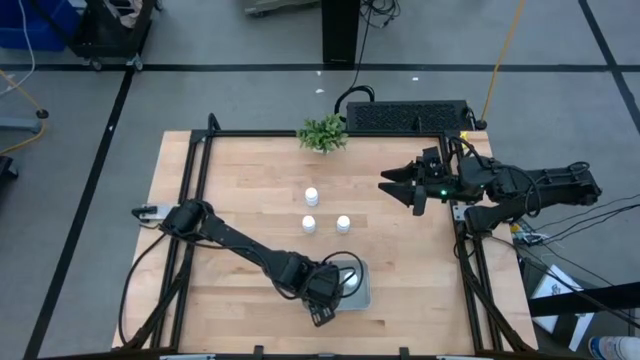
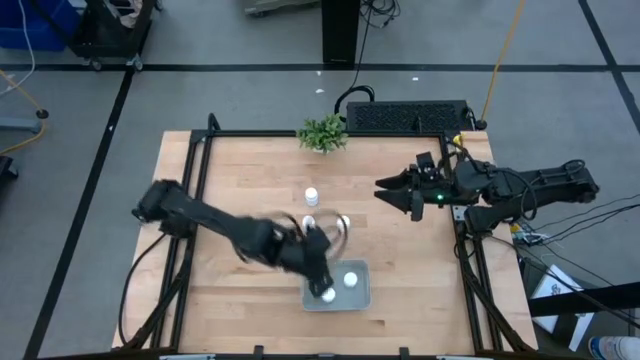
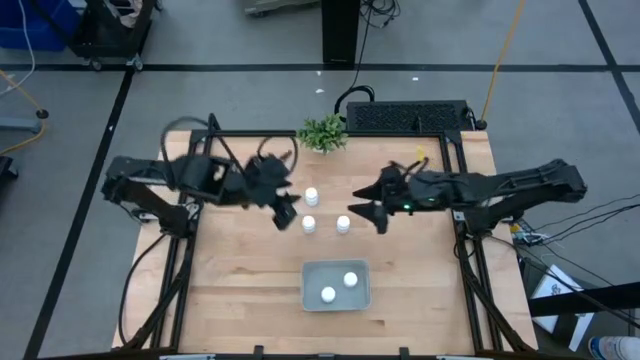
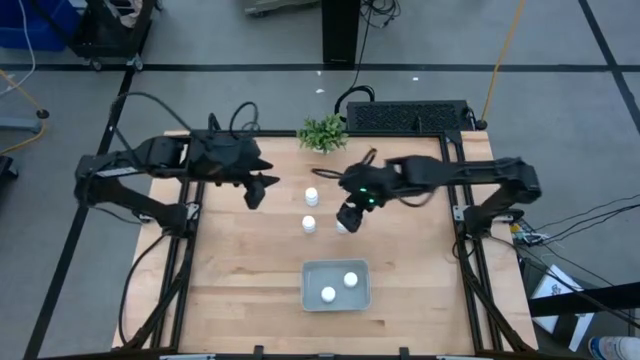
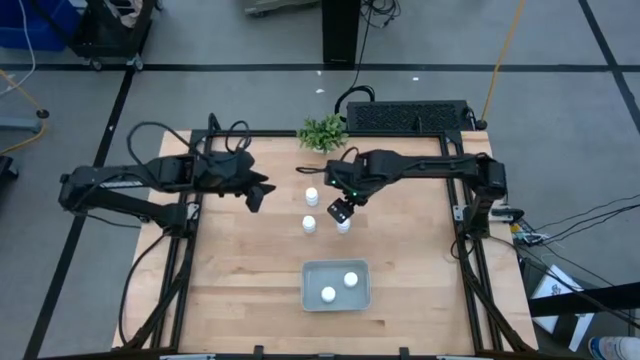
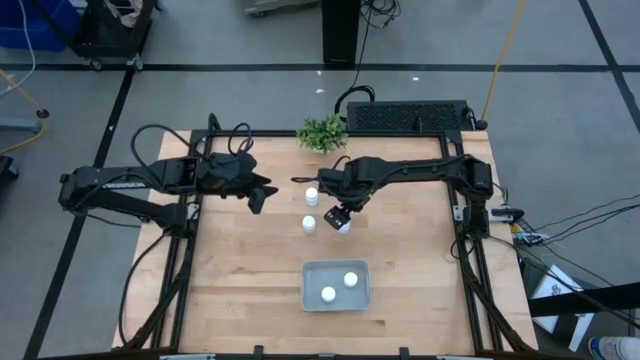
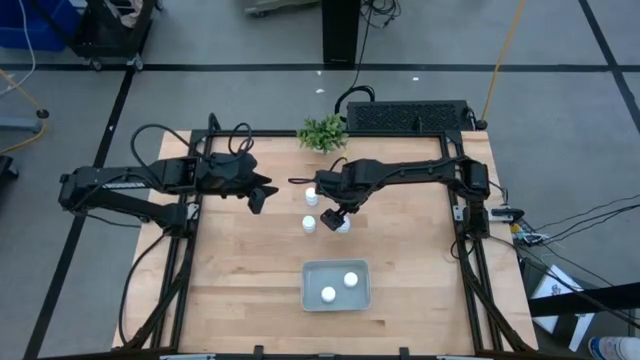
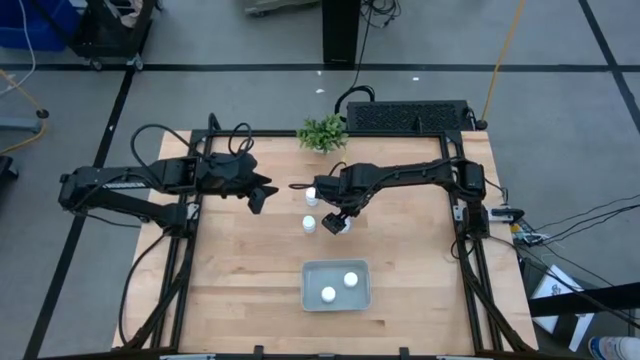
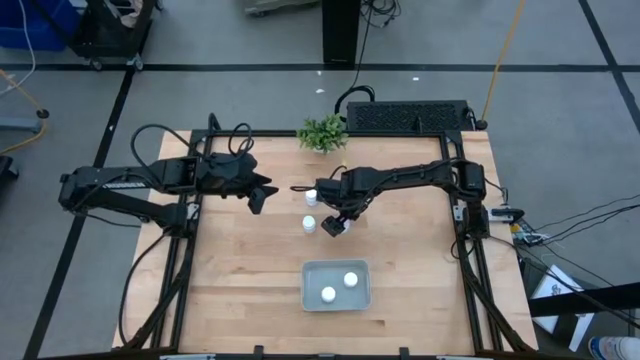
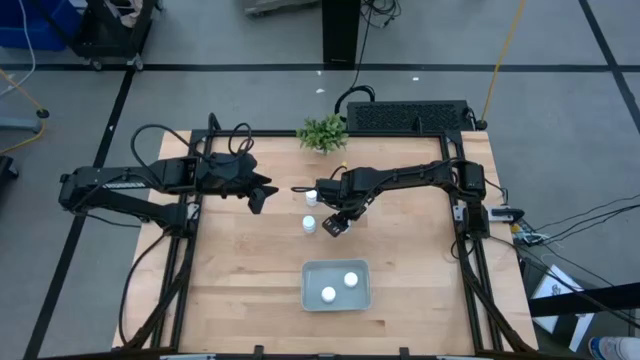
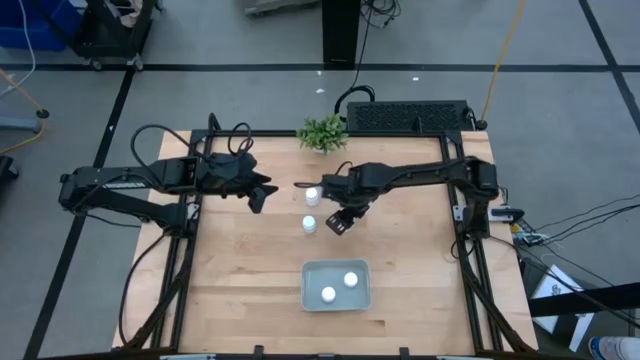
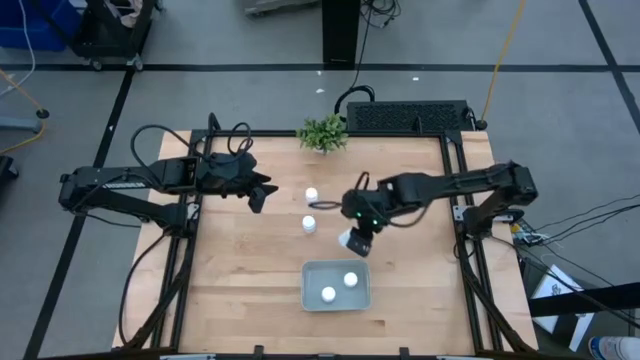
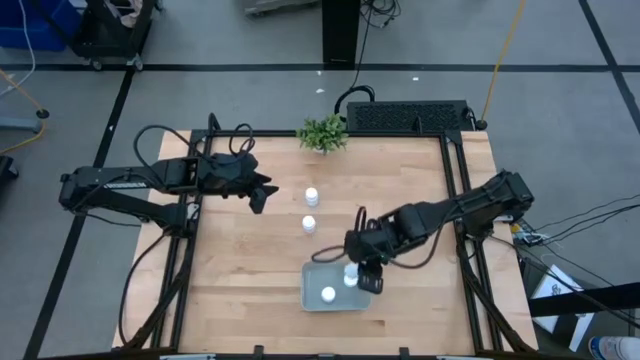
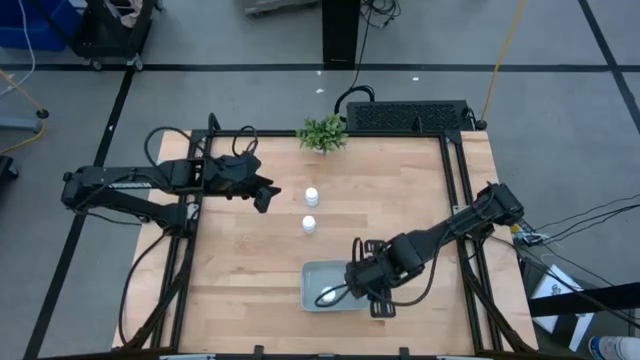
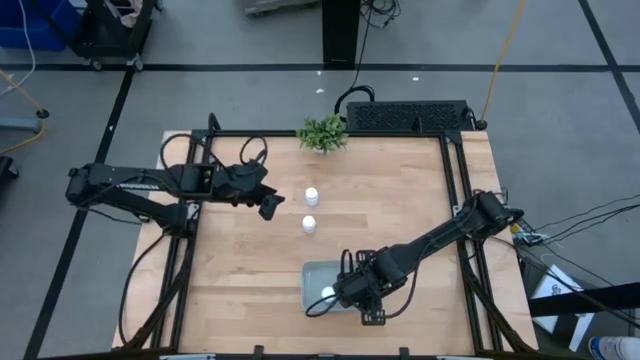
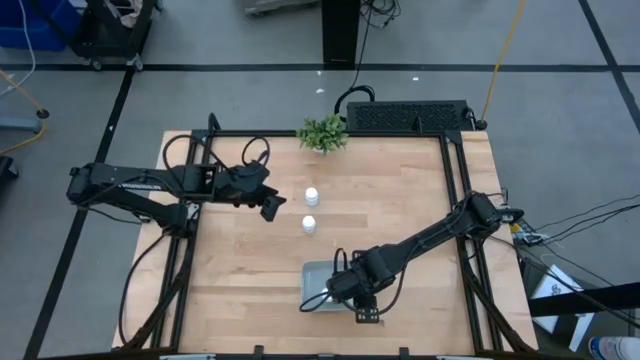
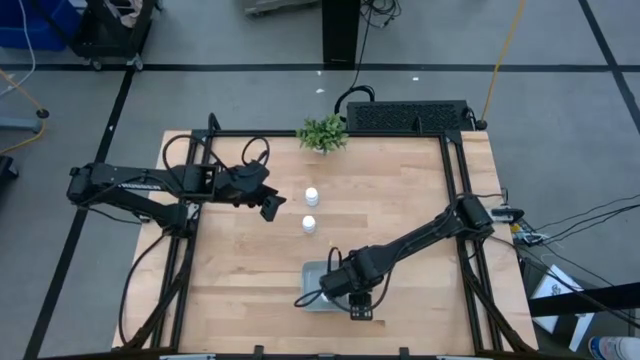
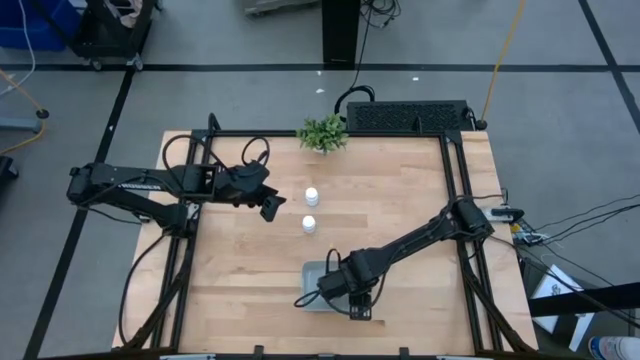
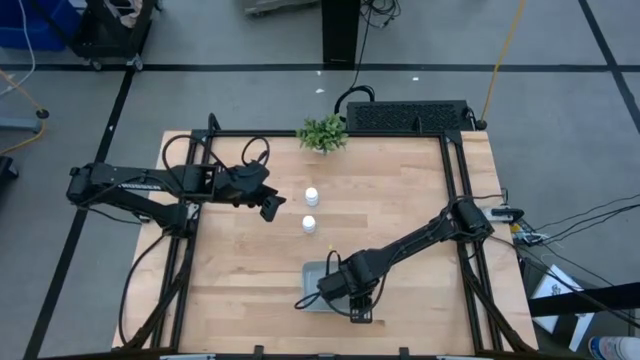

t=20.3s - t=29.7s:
Task: Pick and place pill bottles into a basket
Put the white medicine bottle into the gray bin

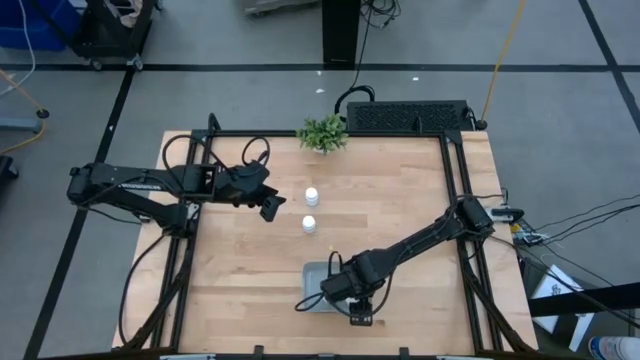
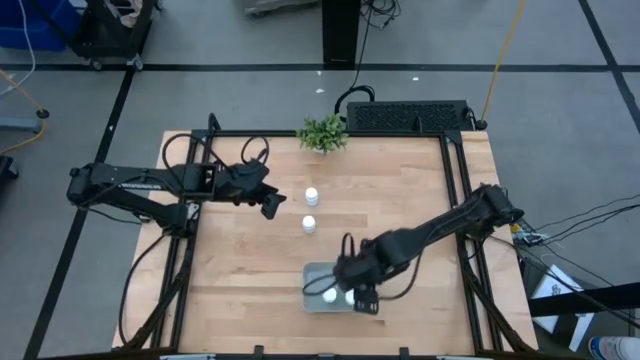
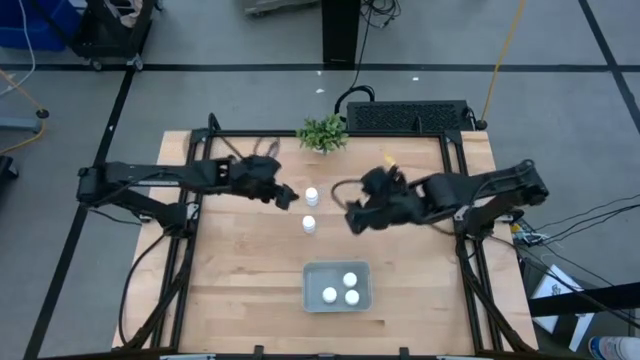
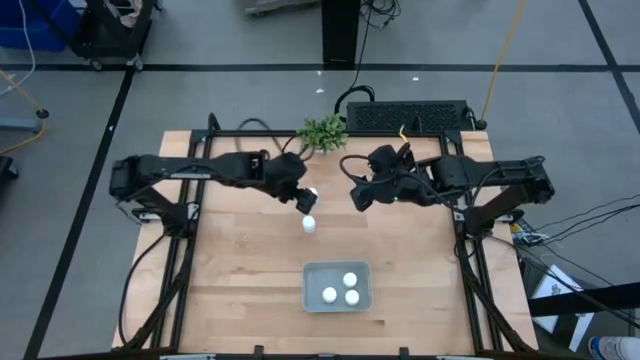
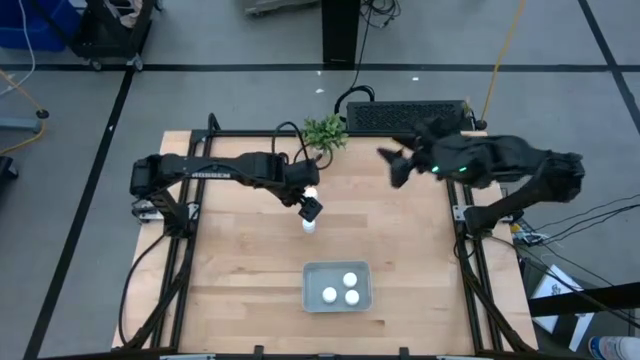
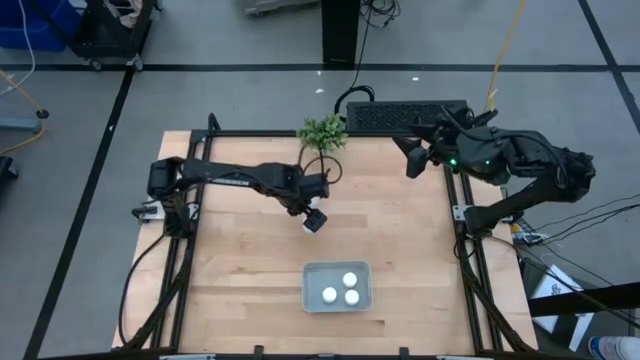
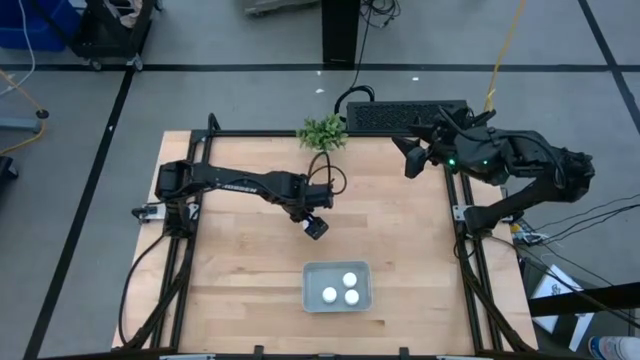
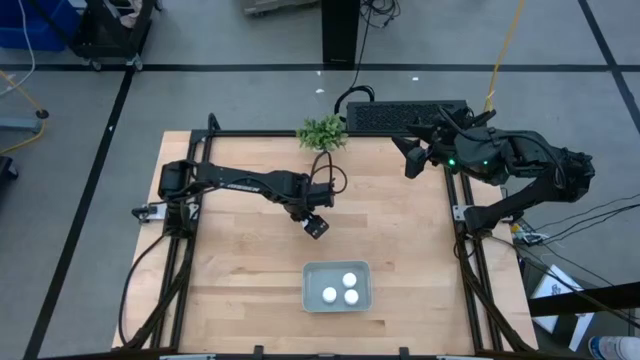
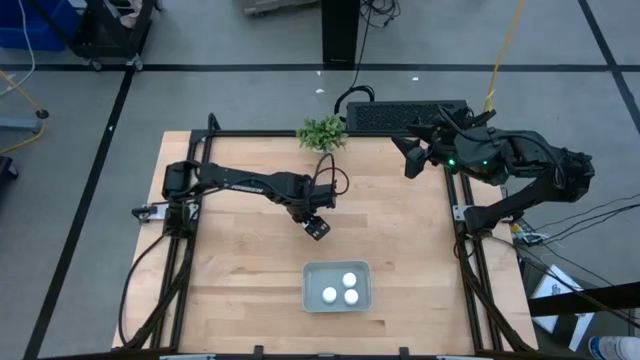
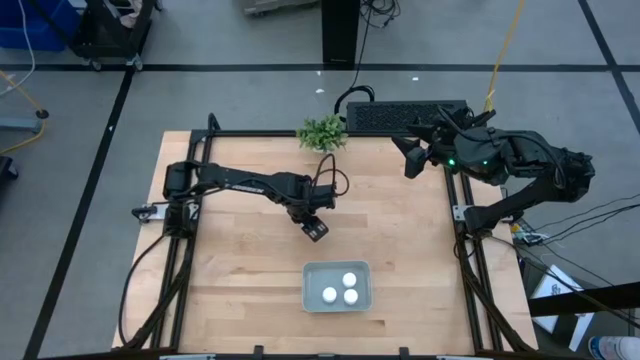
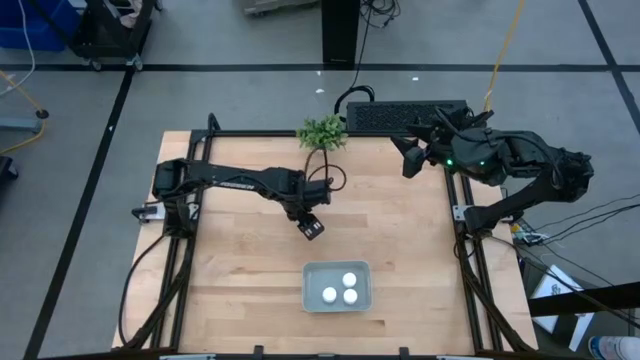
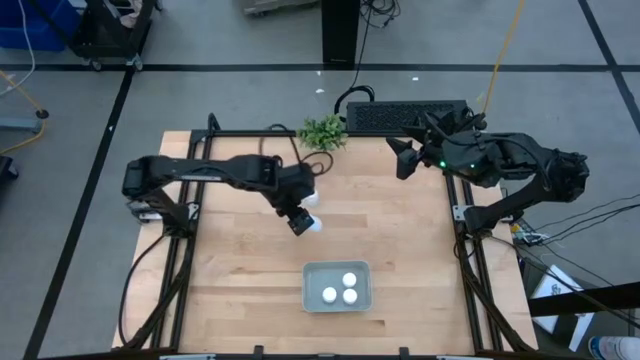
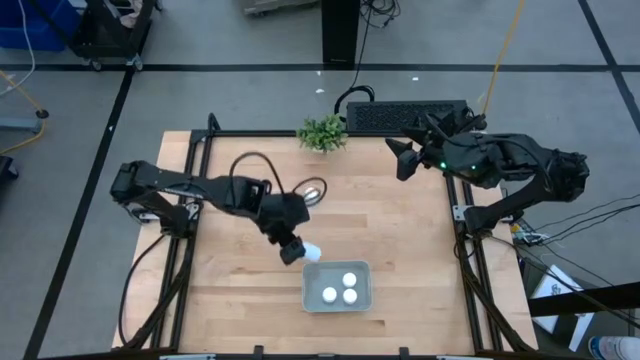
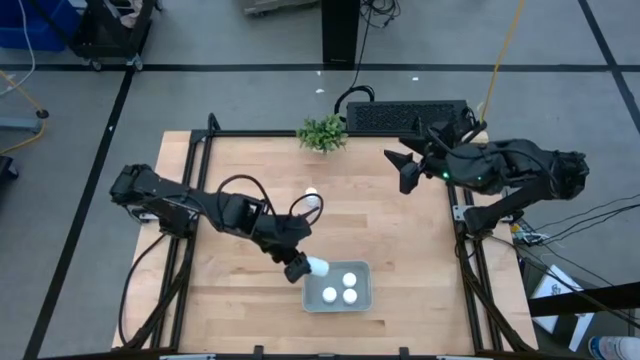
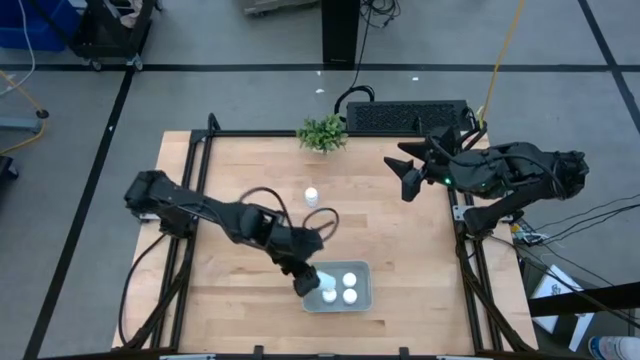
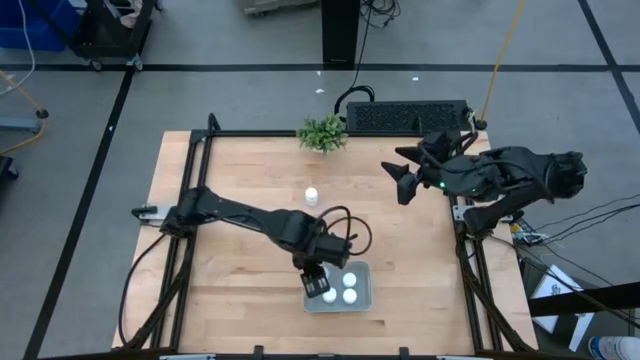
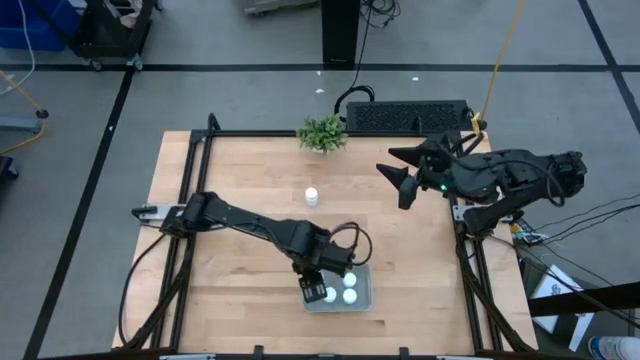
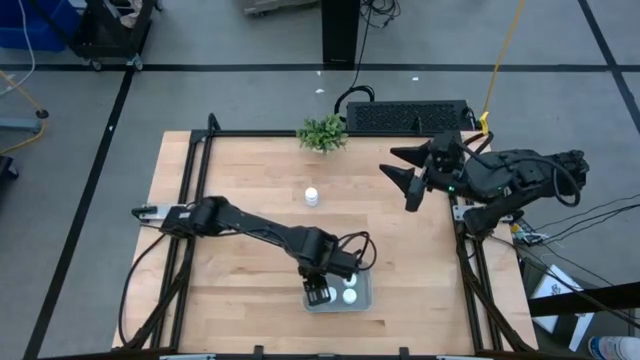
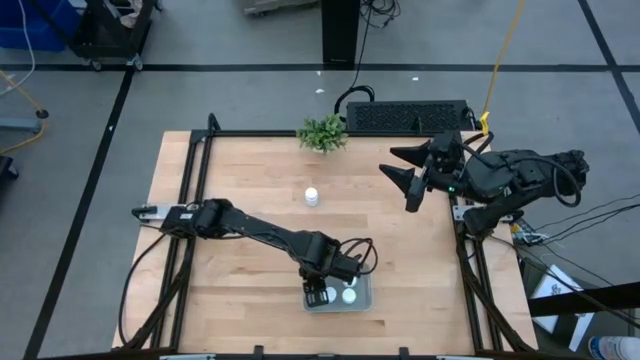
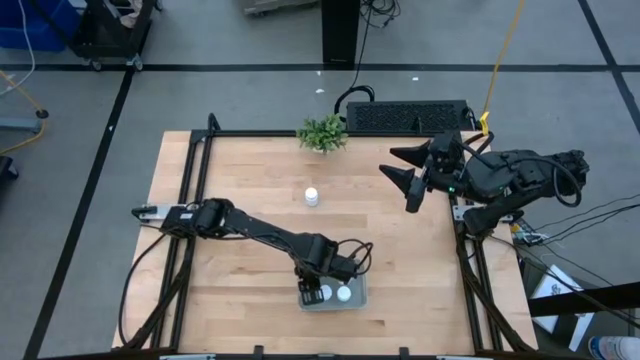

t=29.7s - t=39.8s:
Put the white medicine bottle into the gray bin

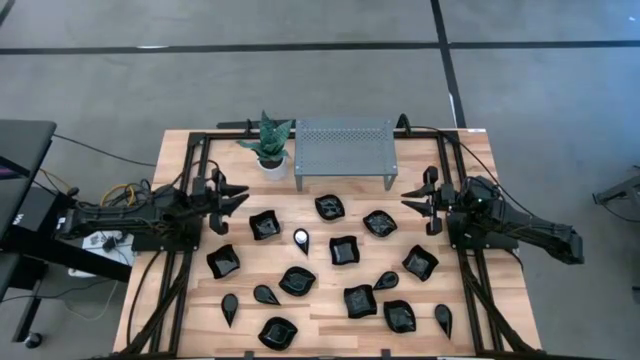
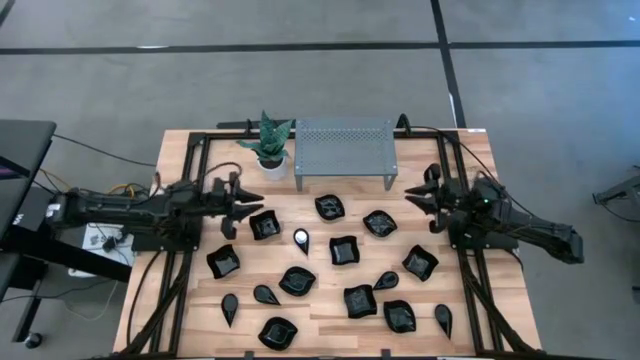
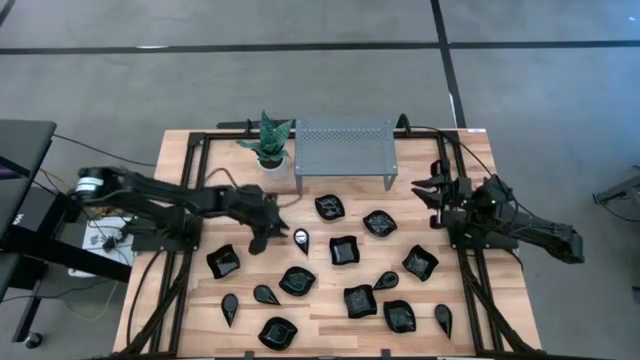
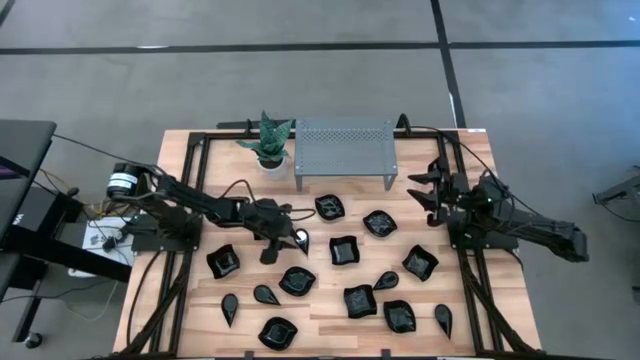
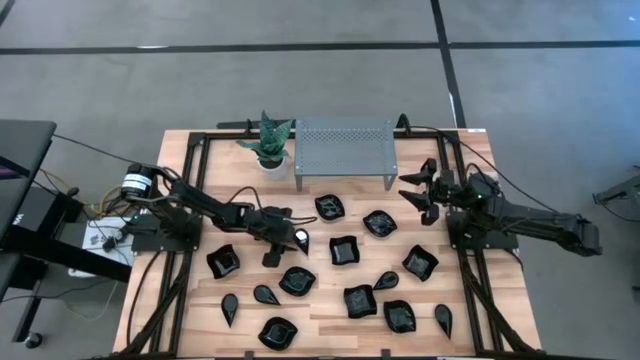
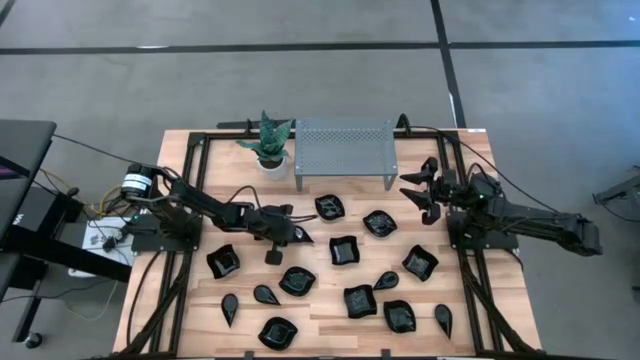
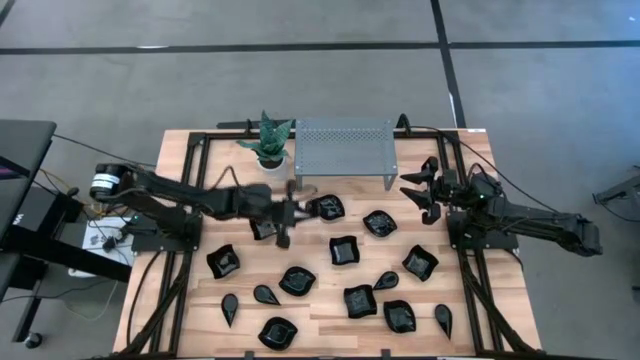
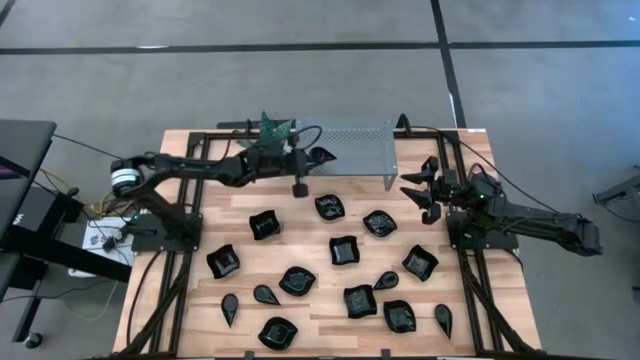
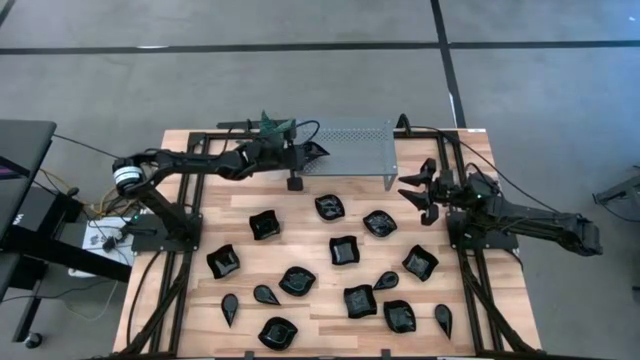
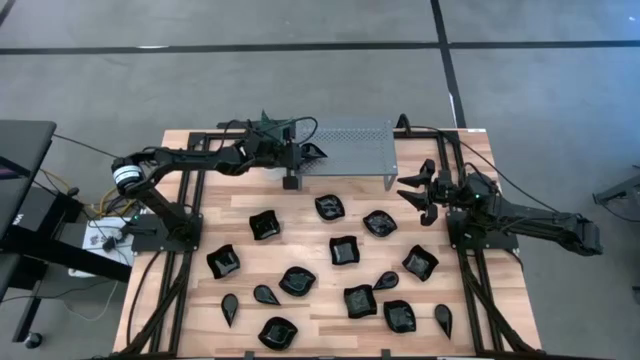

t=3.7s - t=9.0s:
Task: Pick & Place Mini shaped plates
Put the drop-shaped plate on the shelf
